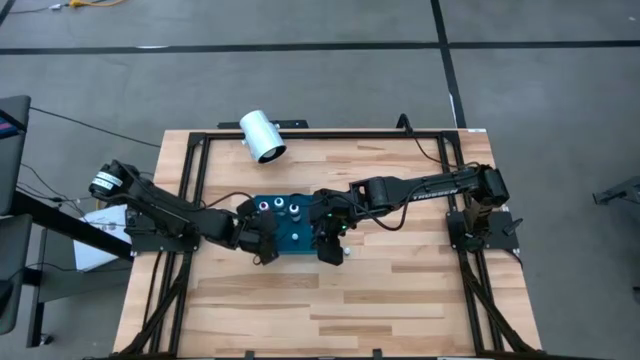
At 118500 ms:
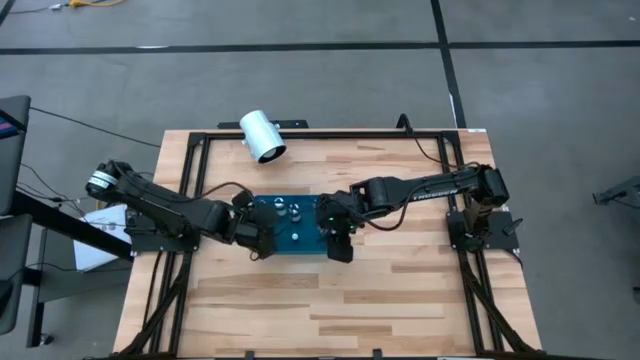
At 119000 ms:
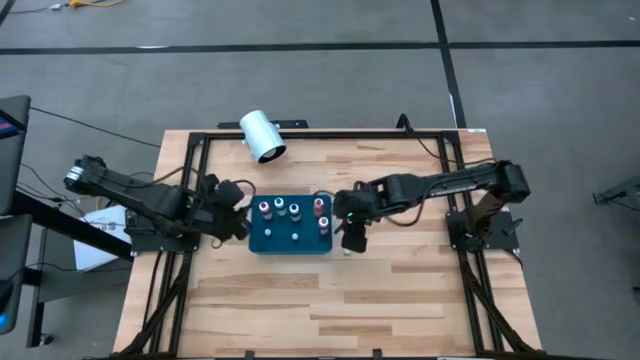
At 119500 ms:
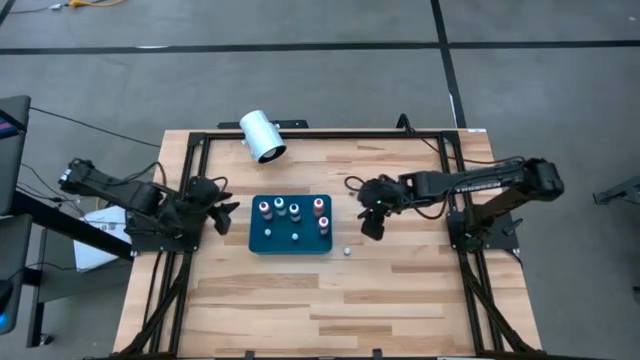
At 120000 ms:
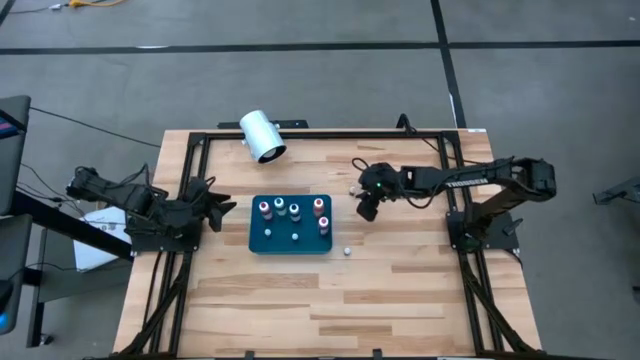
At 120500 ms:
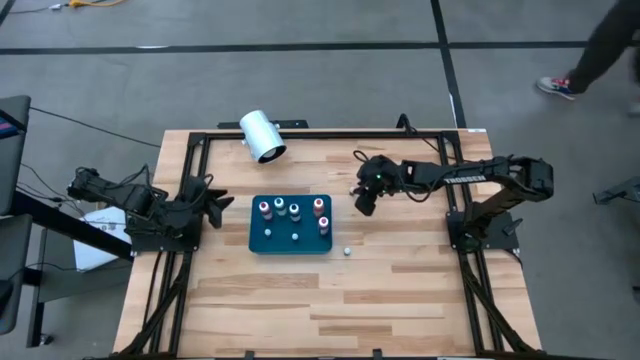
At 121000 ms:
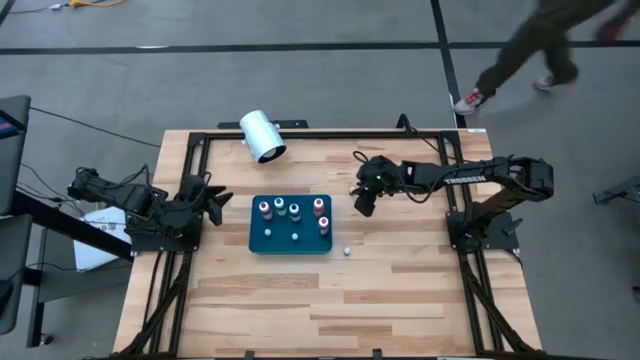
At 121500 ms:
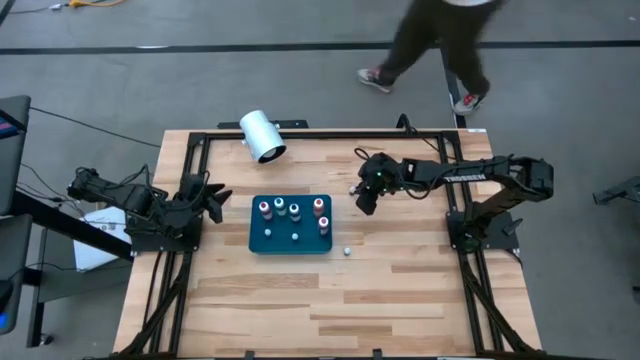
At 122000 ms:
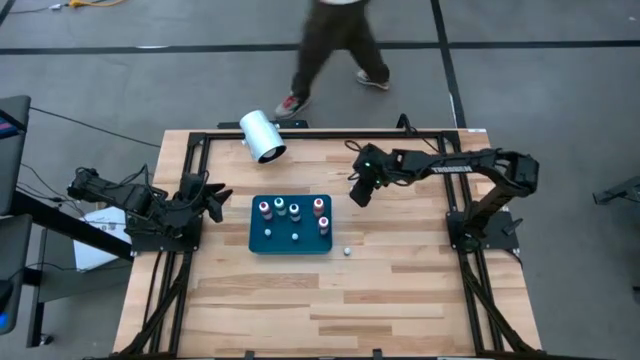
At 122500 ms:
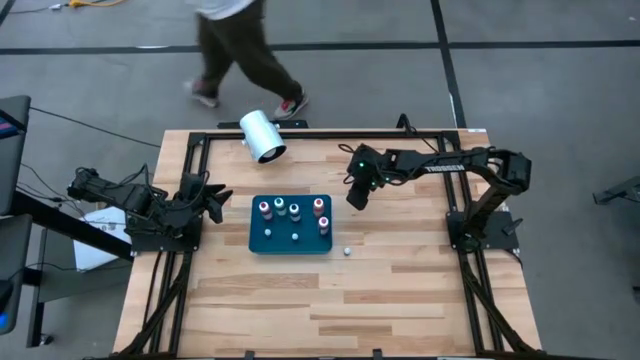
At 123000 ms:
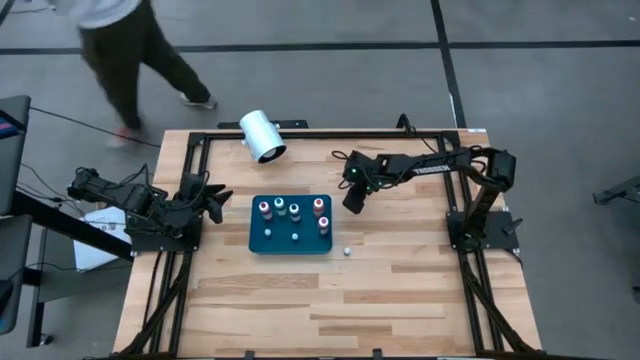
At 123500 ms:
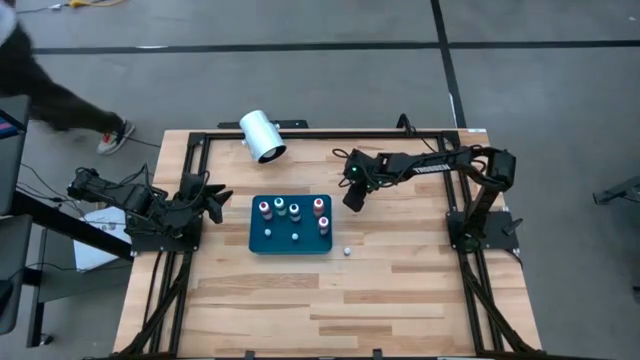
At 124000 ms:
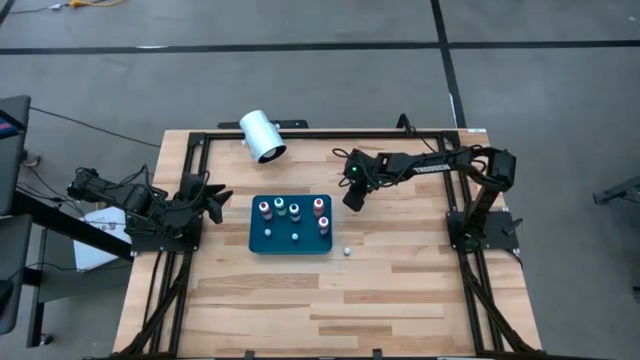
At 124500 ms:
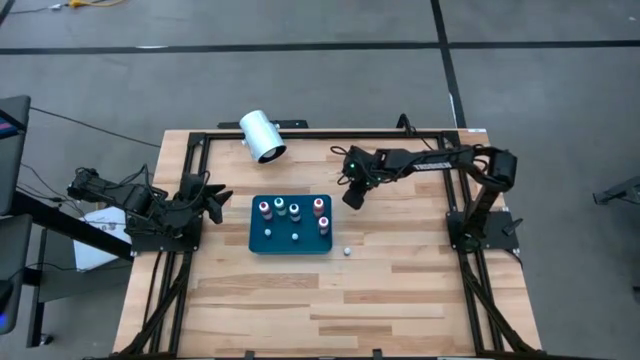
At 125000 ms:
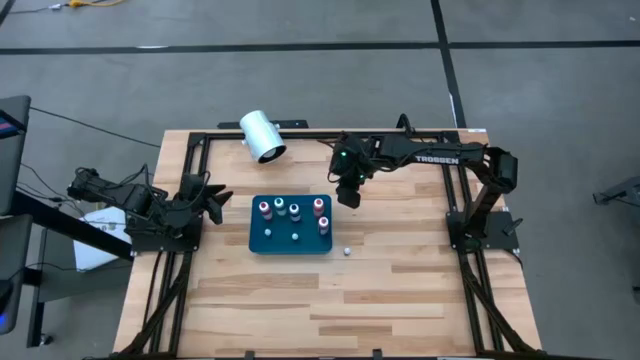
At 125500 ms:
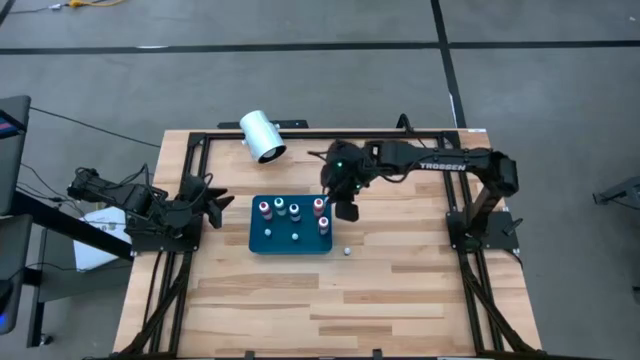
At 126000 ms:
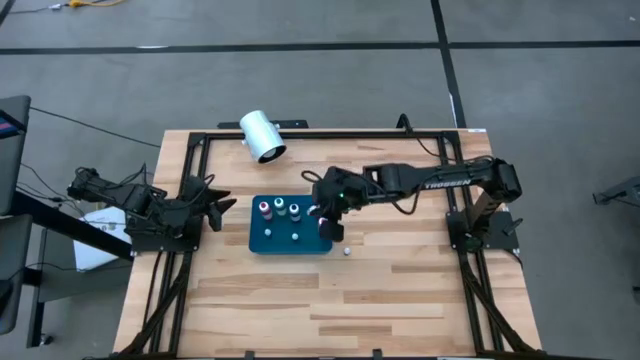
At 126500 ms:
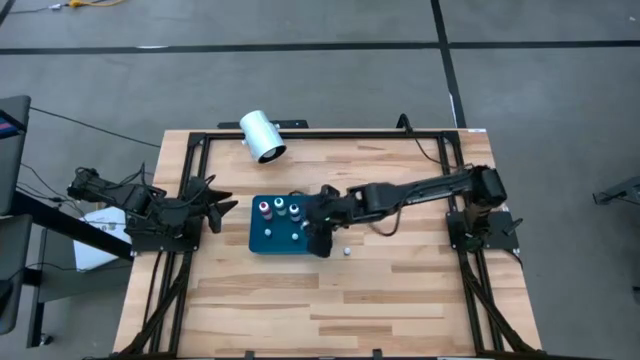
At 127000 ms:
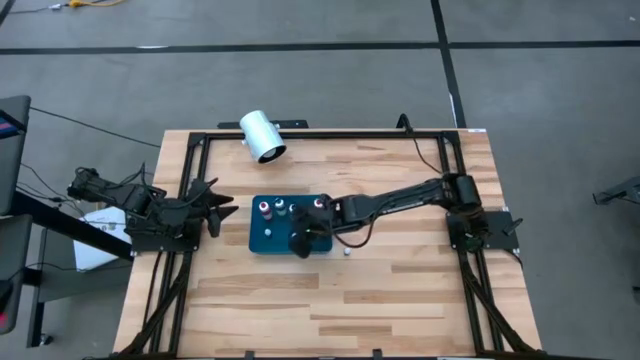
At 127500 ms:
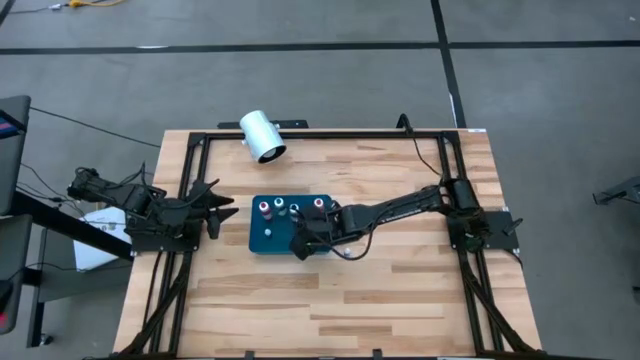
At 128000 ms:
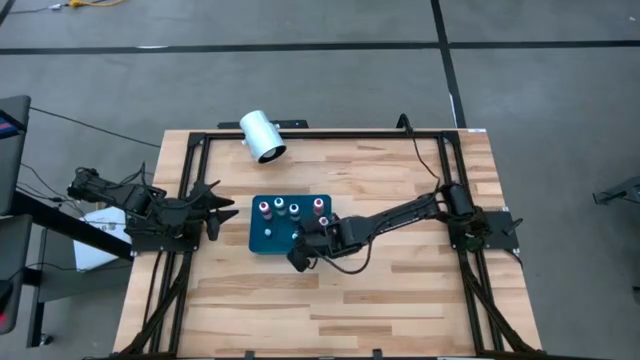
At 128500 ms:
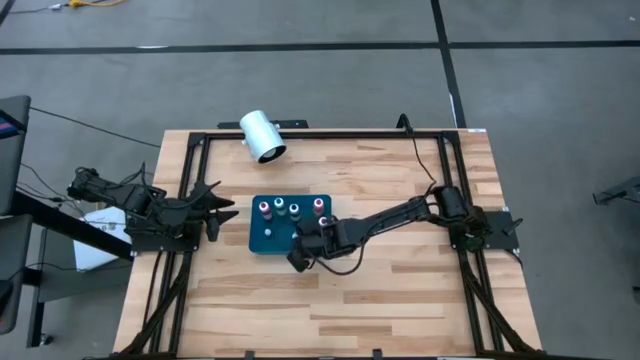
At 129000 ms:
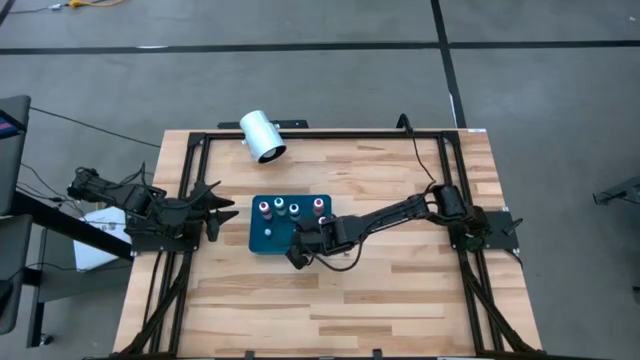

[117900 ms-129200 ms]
Task: Pick & Place food coloring
Put the small purple food coloring bottle into the bin

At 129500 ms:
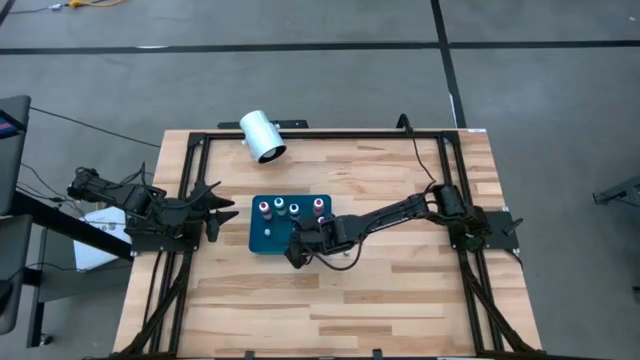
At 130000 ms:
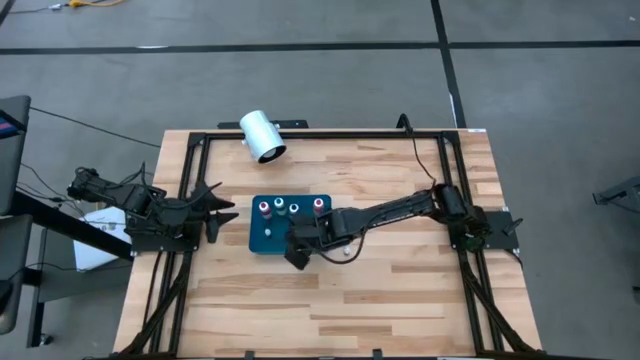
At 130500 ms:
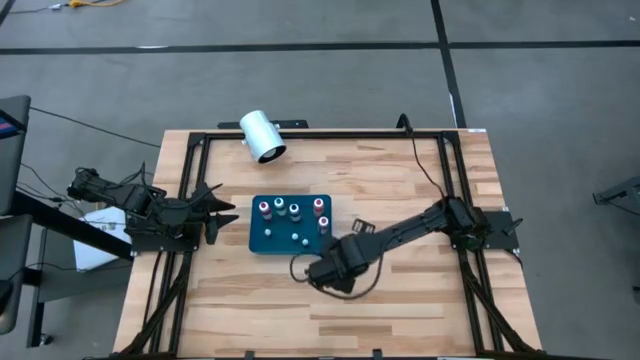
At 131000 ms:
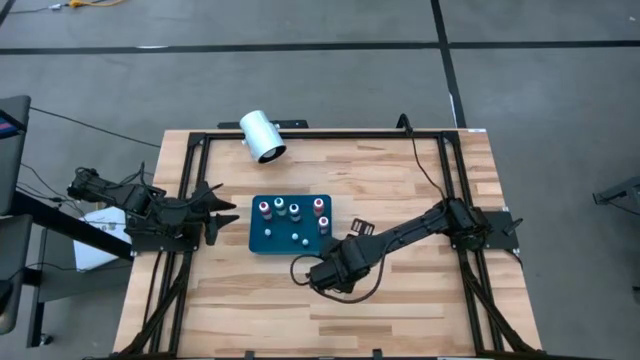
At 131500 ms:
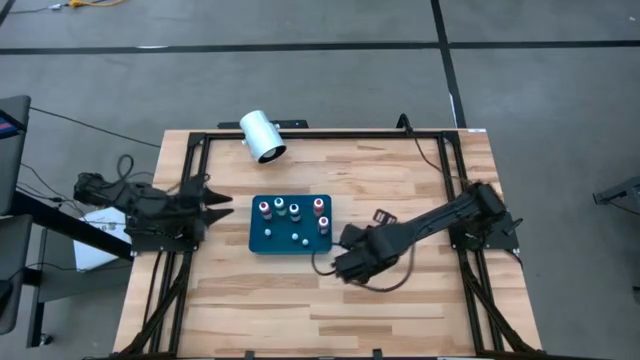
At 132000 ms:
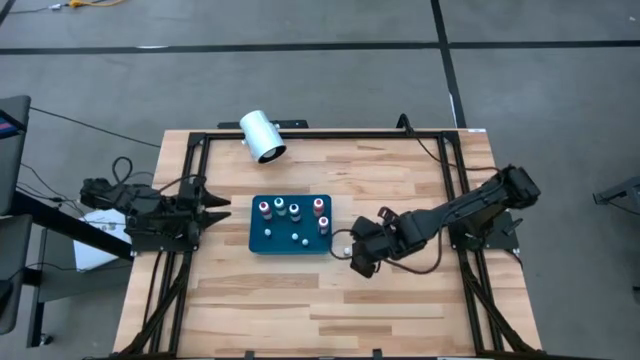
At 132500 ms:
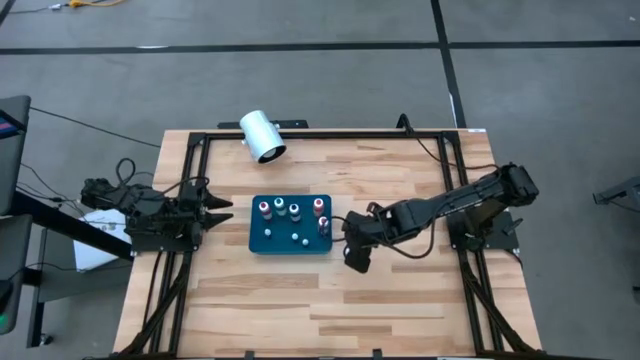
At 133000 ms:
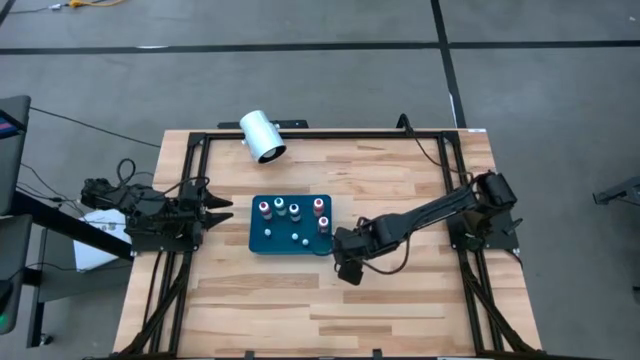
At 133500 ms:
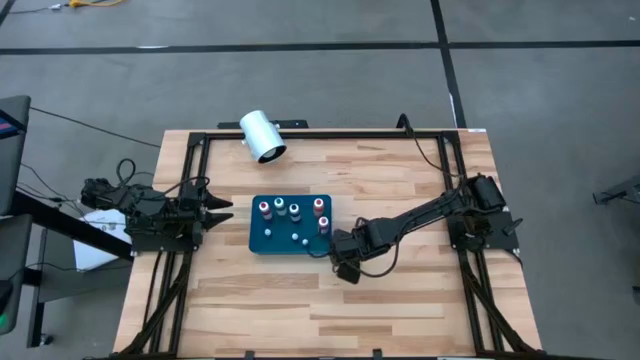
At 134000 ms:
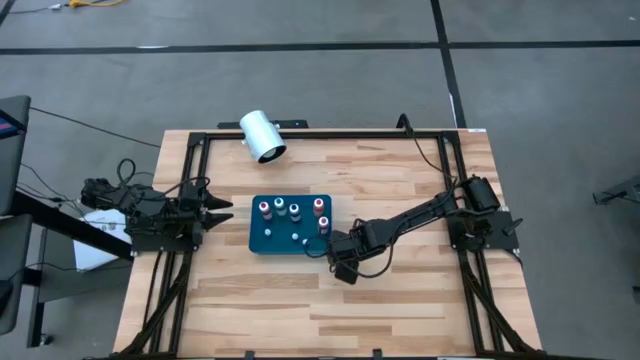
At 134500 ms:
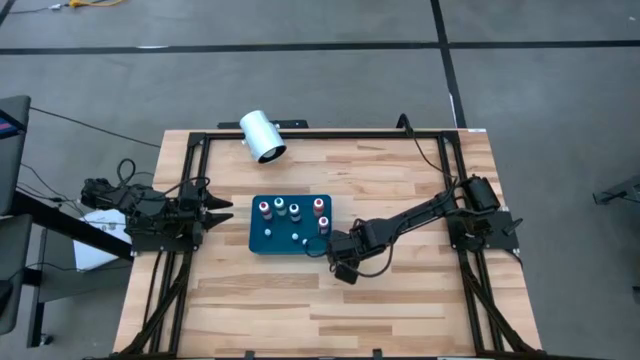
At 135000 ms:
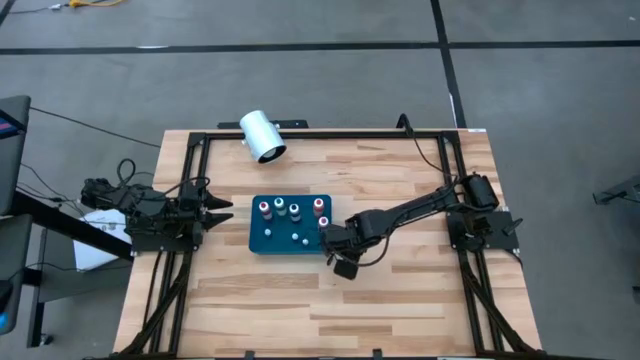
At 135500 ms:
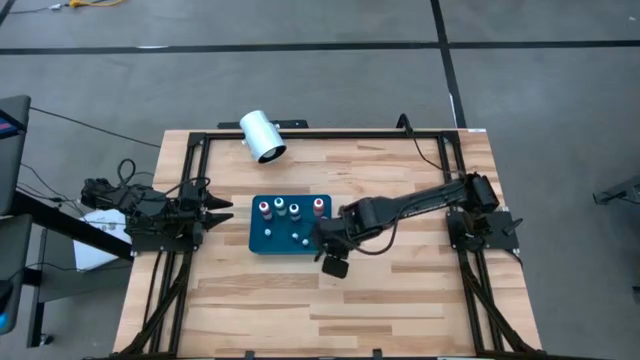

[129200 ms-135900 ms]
Put the small brown food coloring bottle into the bin

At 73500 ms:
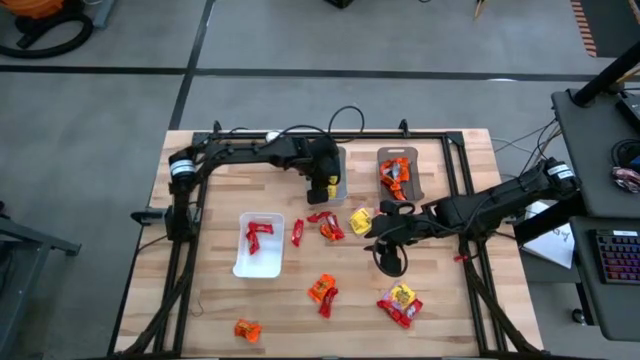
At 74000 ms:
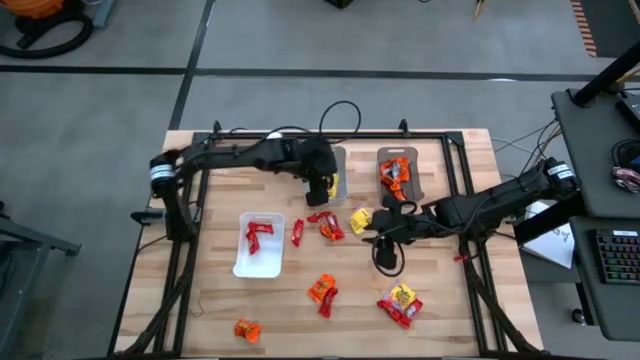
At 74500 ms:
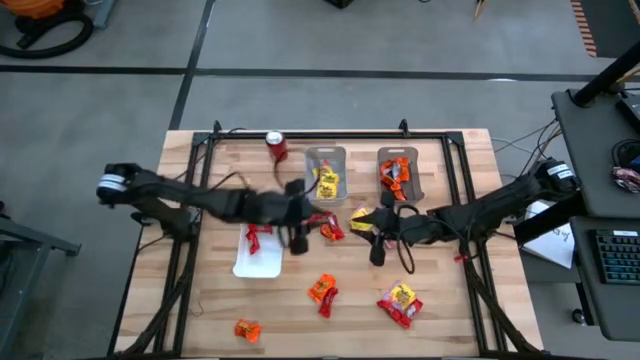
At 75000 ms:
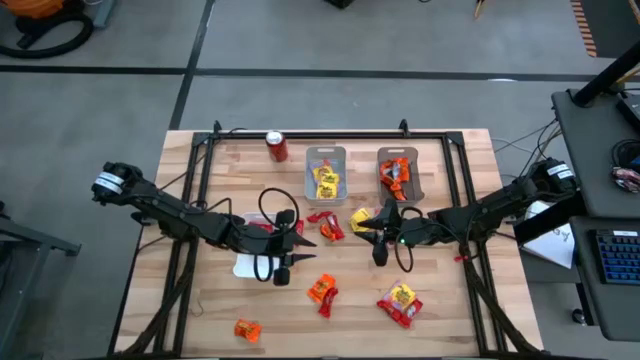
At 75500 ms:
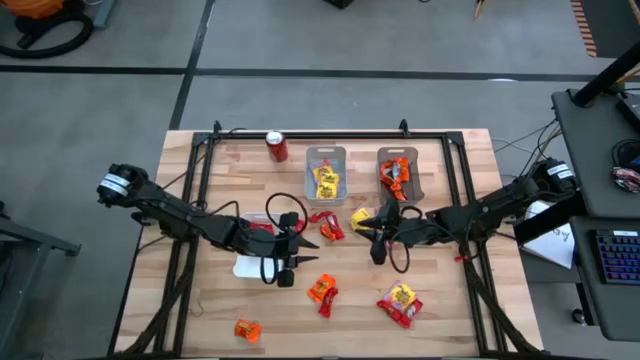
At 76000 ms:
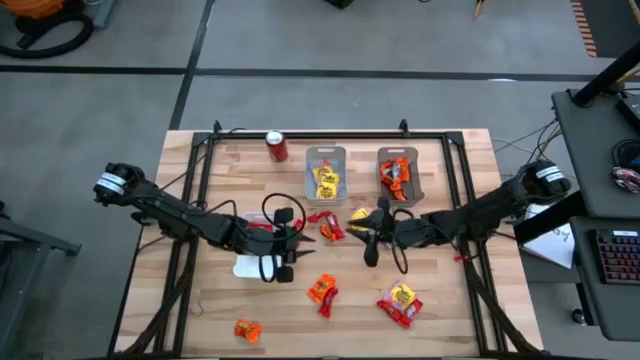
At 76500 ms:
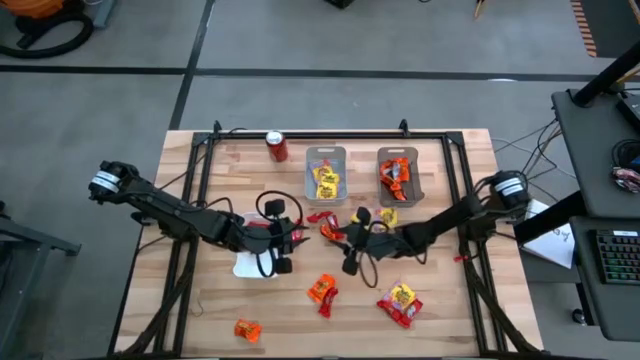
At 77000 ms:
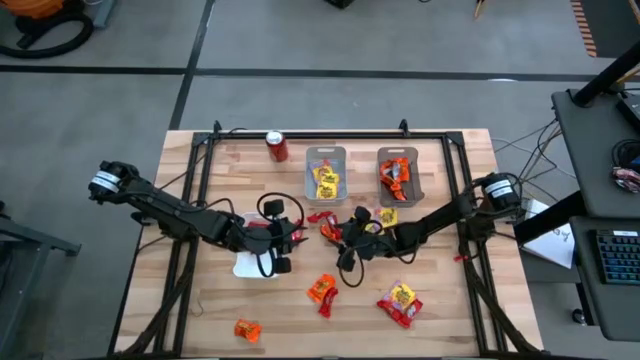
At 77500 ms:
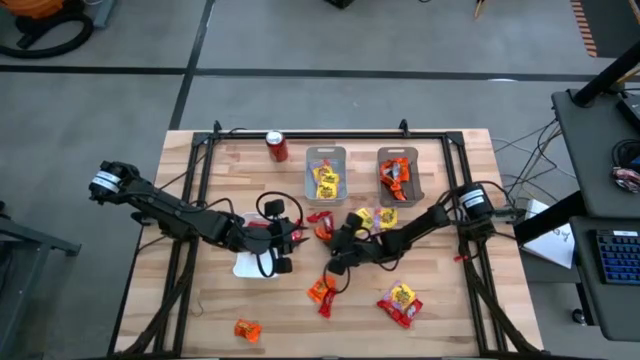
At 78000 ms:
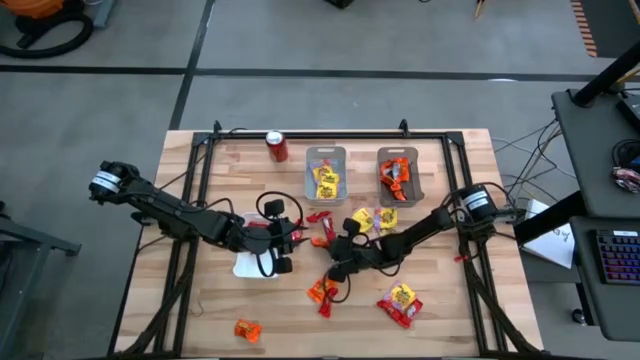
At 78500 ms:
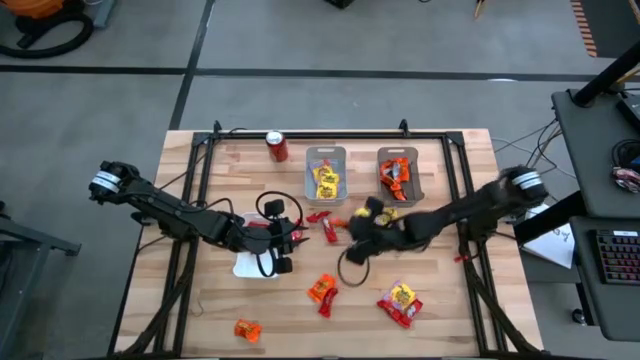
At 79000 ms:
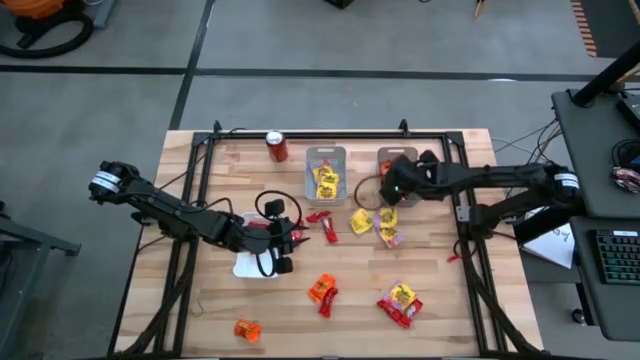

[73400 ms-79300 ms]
Task: Sort candy
Put the orange candy into the black bin
